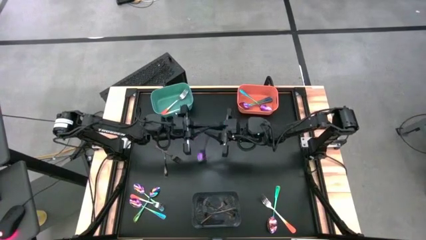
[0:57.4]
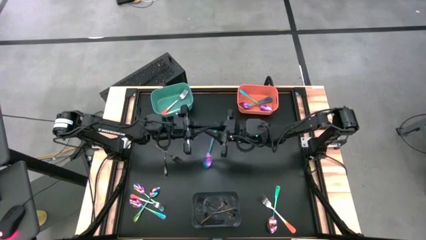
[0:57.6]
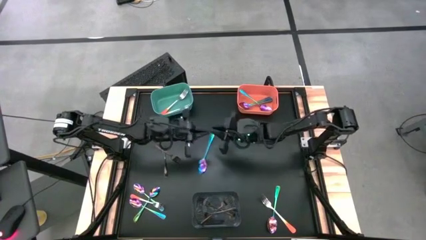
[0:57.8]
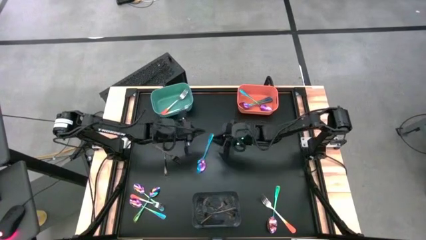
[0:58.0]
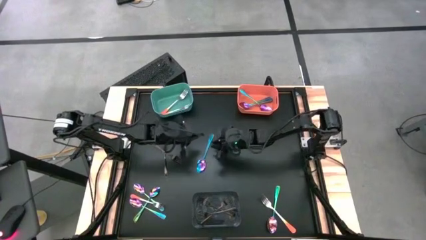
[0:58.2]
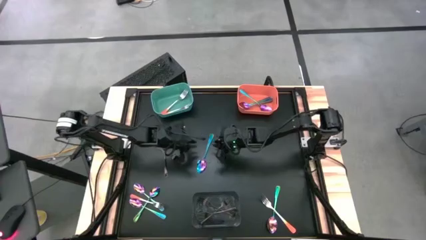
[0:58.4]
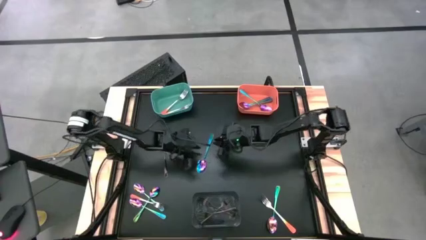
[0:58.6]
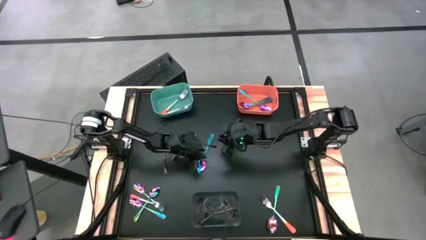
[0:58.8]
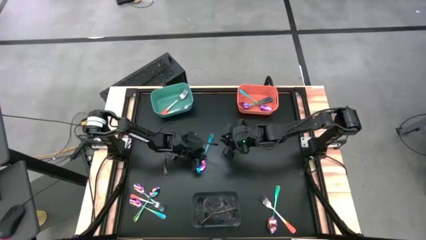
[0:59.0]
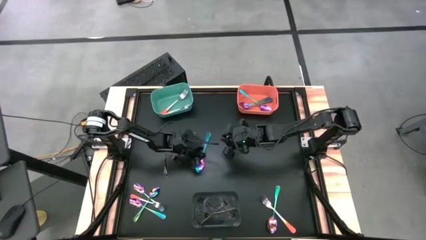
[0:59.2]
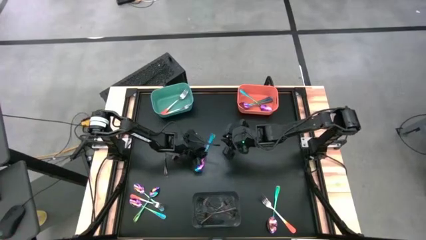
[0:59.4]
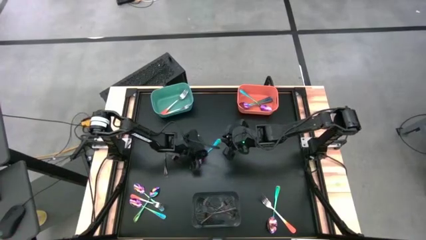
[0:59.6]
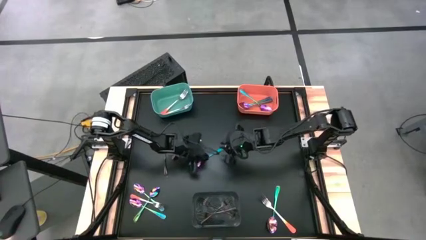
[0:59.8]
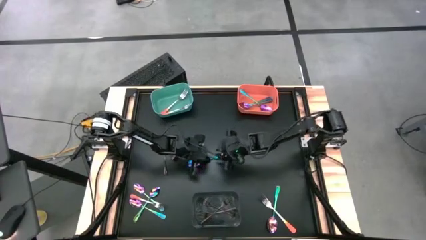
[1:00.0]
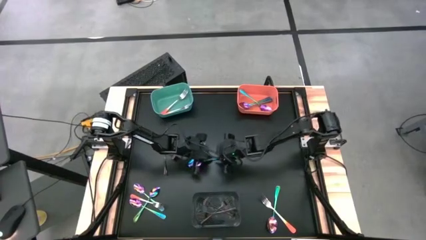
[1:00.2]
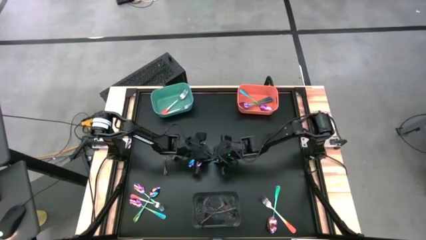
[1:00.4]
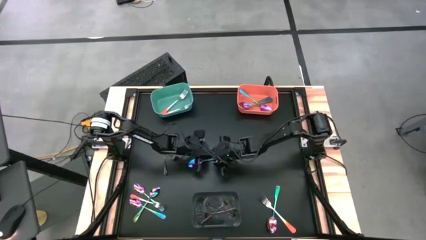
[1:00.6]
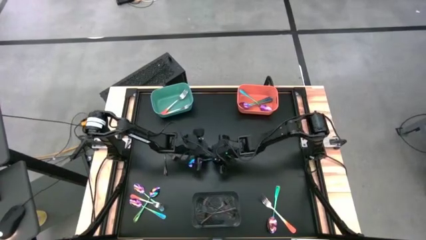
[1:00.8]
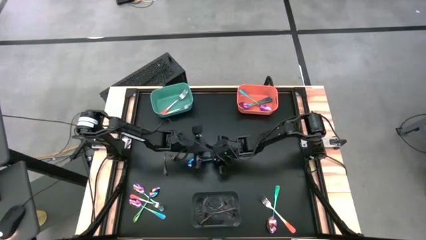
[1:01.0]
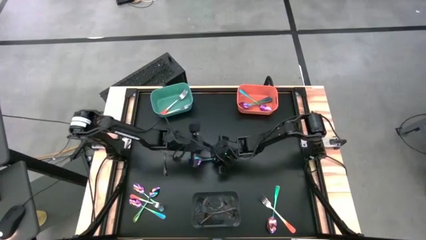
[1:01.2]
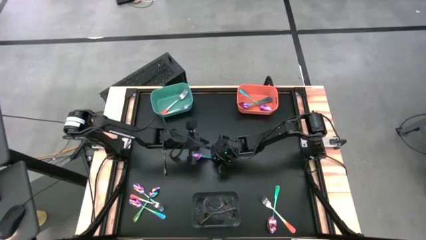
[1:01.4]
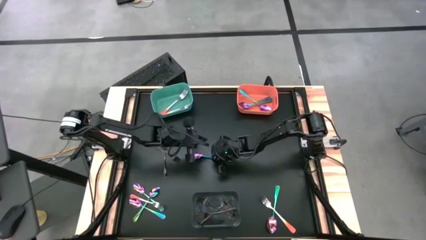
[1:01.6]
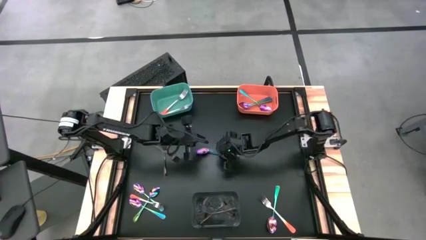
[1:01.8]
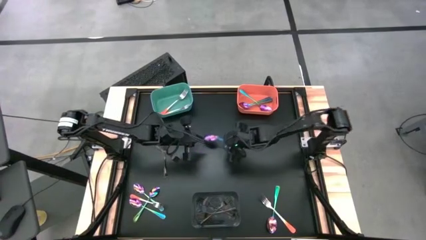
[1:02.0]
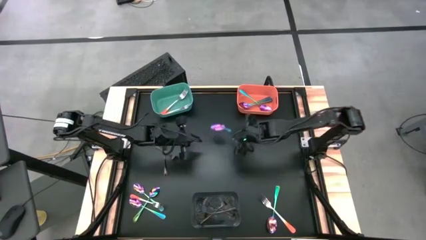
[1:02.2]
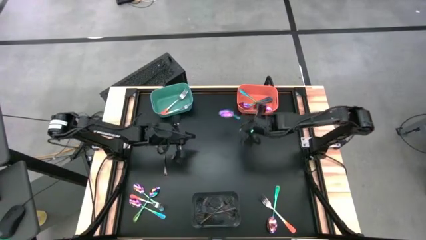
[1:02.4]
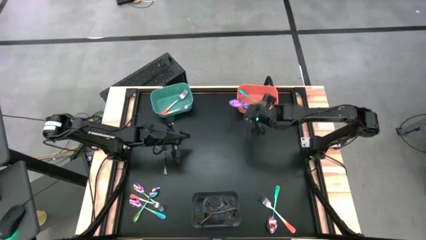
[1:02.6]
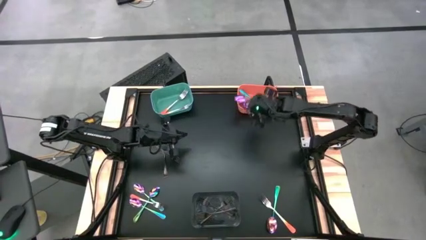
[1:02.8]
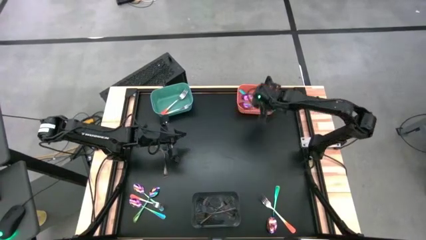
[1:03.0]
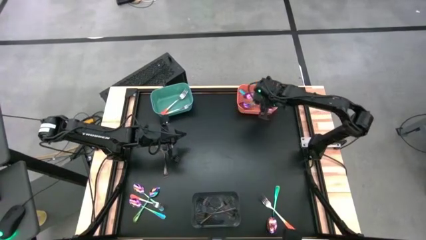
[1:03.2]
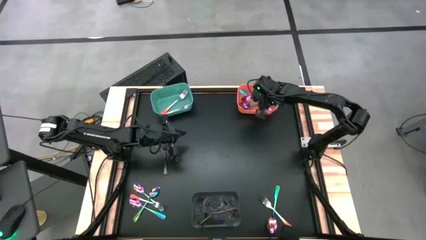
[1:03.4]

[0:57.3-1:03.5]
Task: Sort silverware by color (type)
Put the blue spoon into the orange bin

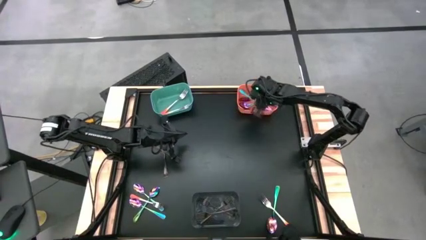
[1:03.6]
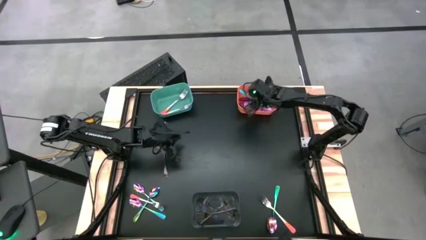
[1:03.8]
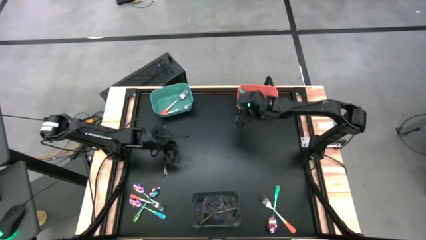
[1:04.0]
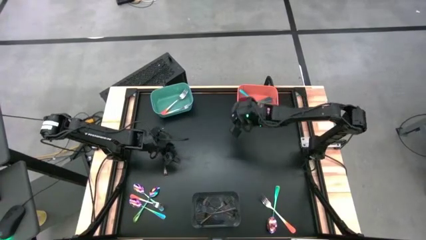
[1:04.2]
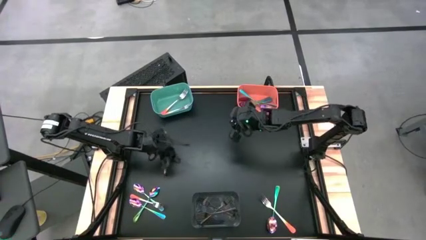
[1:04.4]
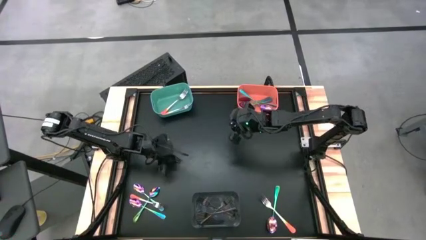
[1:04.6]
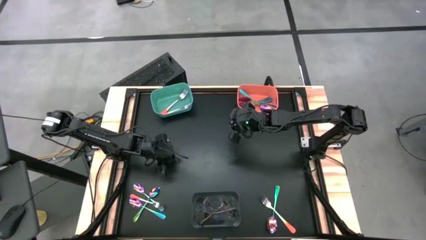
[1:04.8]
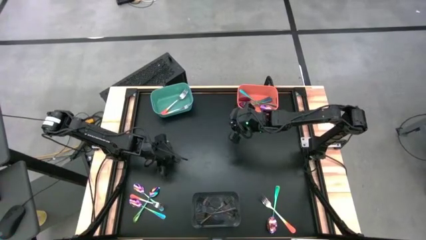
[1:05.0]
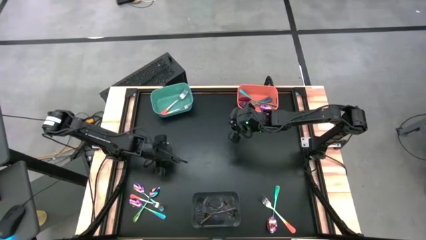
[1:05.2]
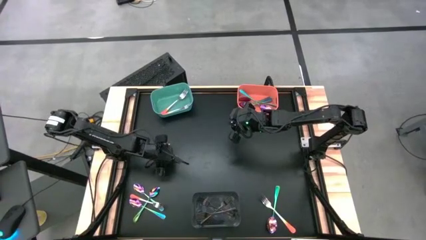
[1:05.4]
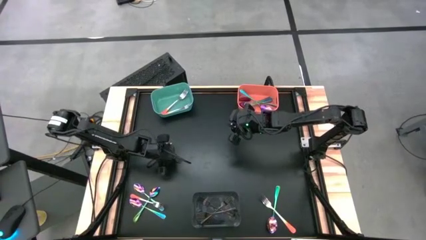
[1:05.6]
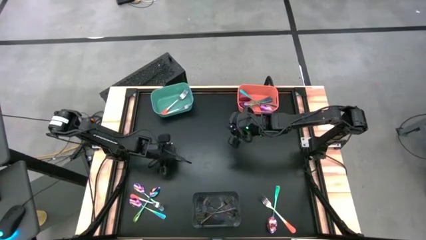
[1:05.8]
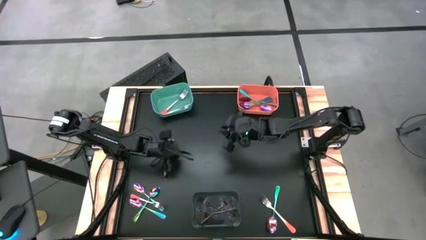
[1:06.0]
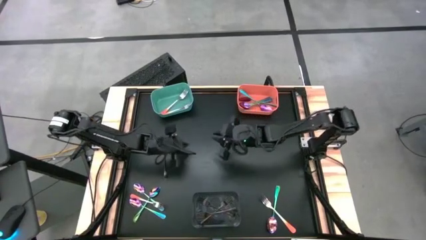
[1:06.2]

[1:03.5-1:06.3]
Put the black fork into the black bin

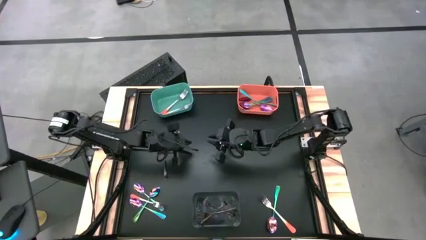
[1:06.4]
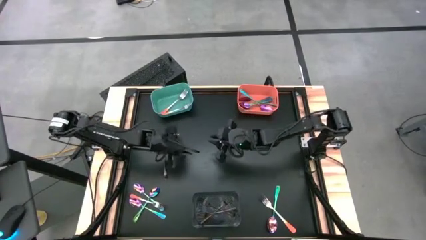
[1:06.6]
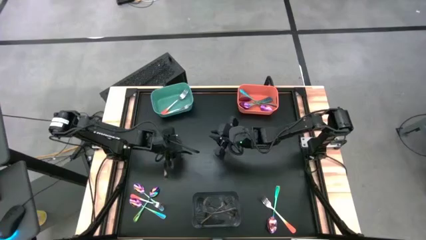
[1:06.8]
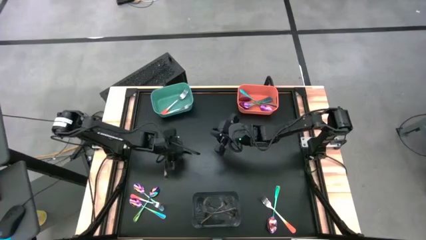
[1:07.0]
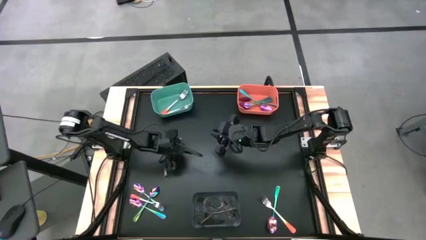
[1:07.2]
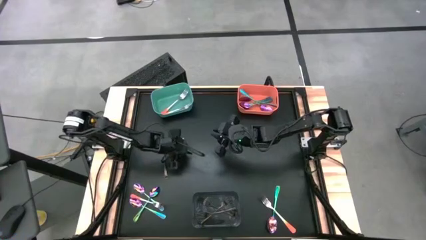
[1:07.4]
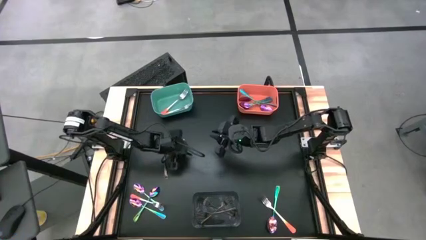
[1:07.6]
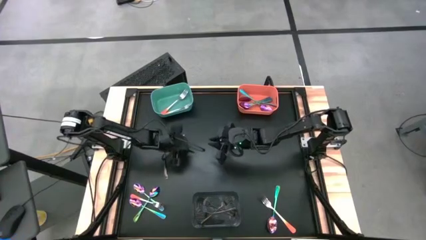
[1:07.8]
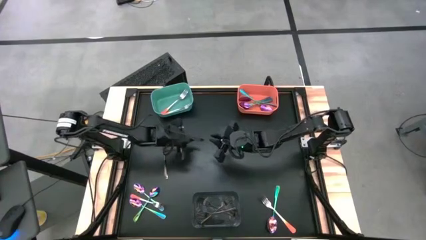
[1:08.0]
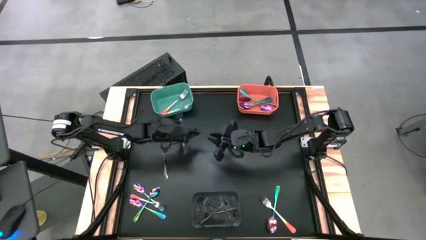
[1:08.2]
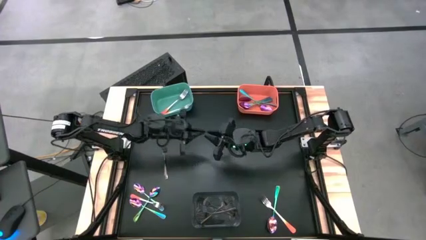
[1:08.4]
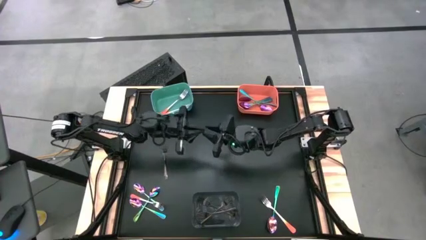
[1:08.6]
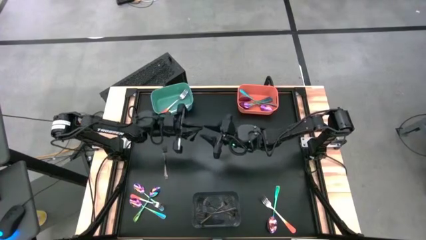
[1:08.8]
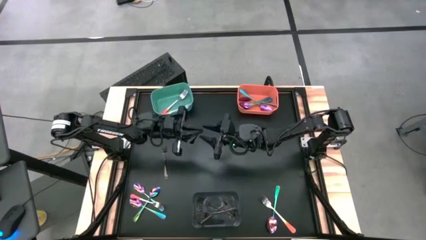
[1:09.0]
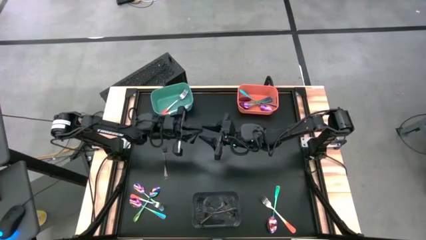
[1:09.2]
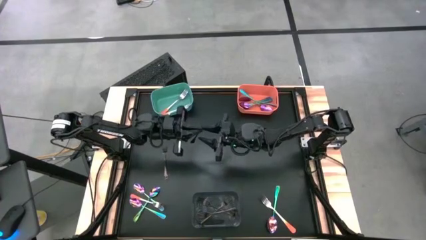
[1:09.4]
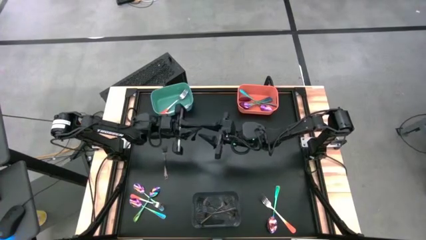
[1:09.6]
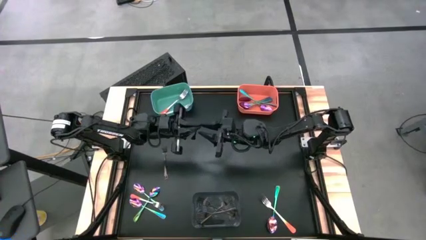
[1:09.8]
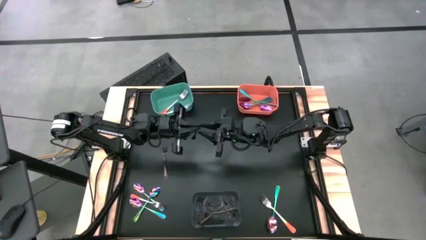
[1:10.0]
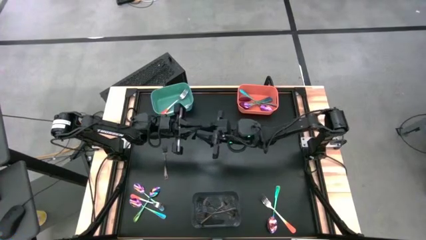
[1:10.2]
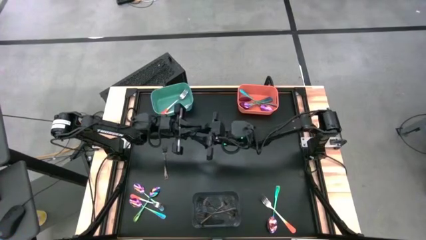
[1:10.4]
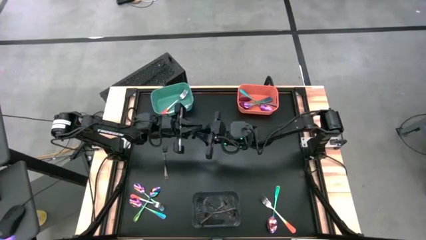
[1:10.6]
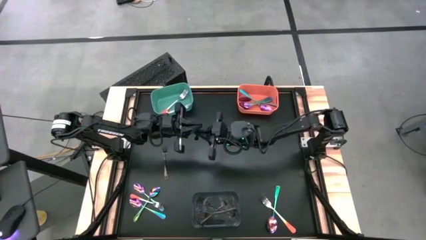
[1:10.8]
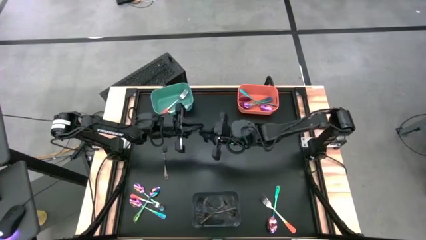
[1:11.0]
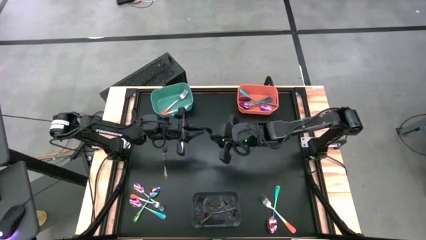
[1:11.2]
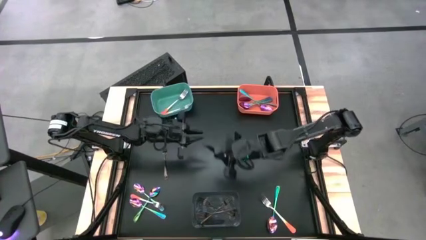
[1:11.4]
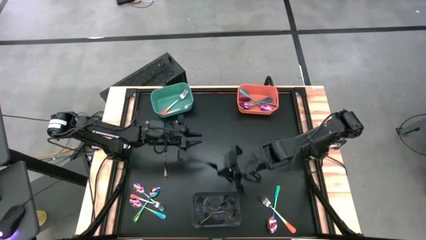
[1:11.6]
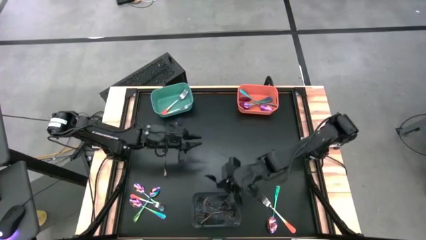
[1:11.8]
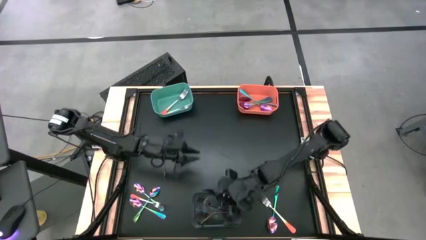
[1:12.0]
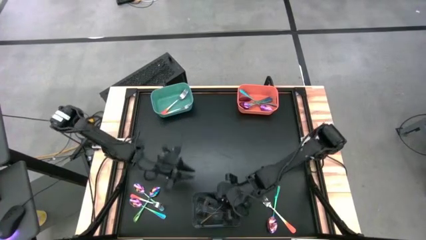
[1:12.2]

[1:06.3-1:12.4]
Put the silver fork into the black bin
